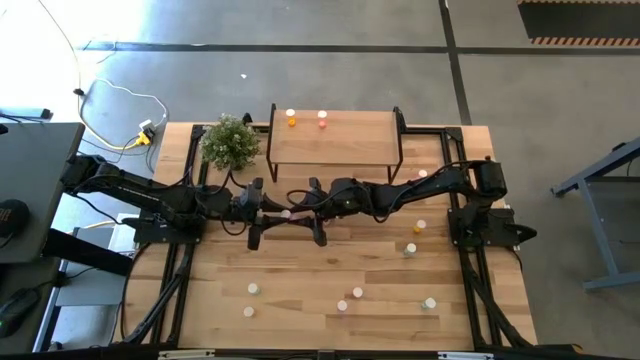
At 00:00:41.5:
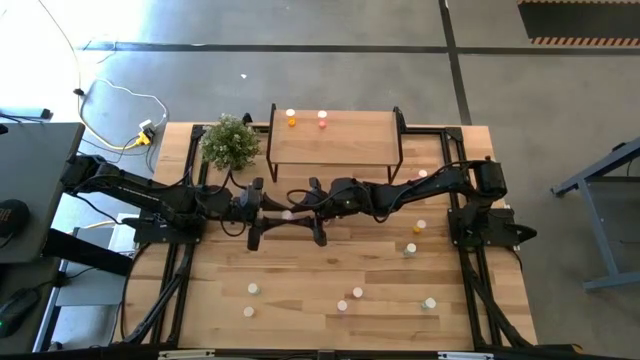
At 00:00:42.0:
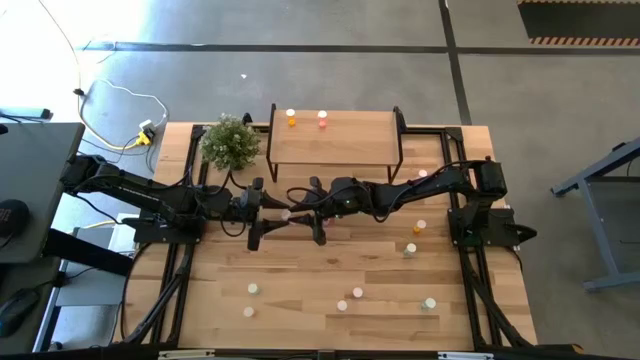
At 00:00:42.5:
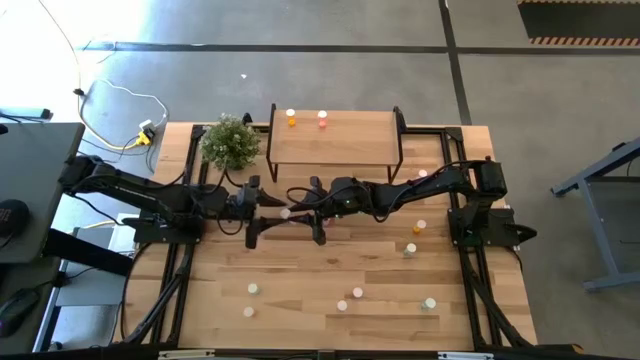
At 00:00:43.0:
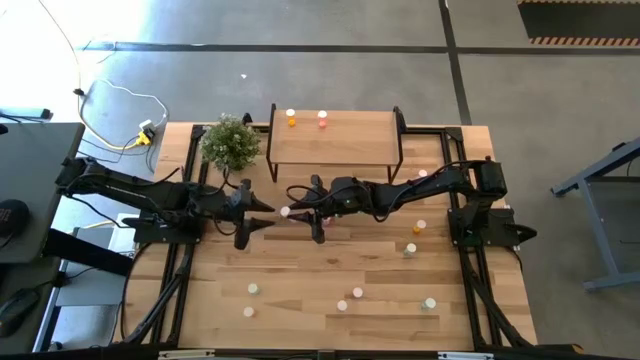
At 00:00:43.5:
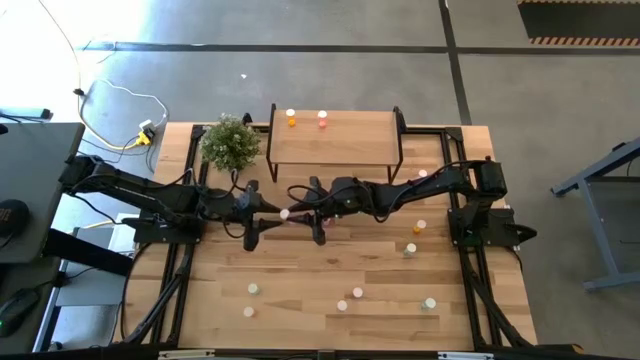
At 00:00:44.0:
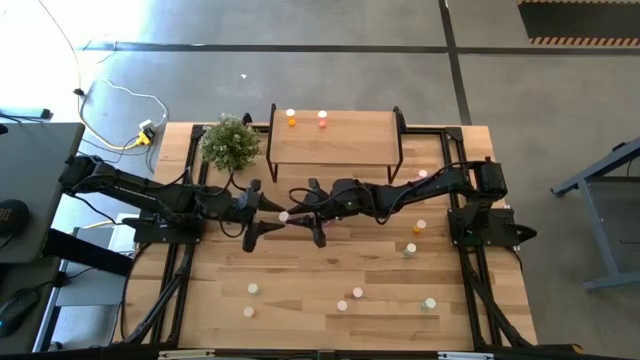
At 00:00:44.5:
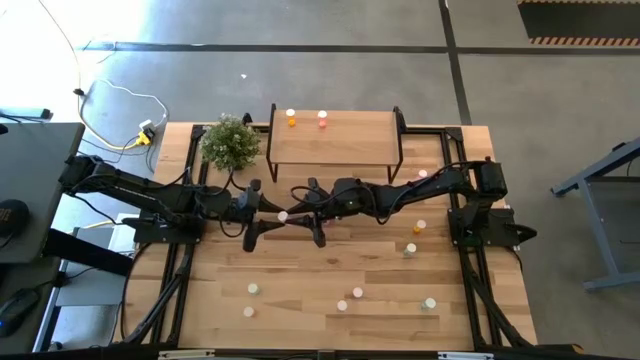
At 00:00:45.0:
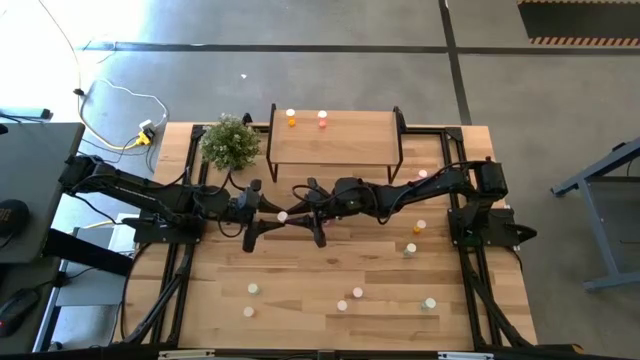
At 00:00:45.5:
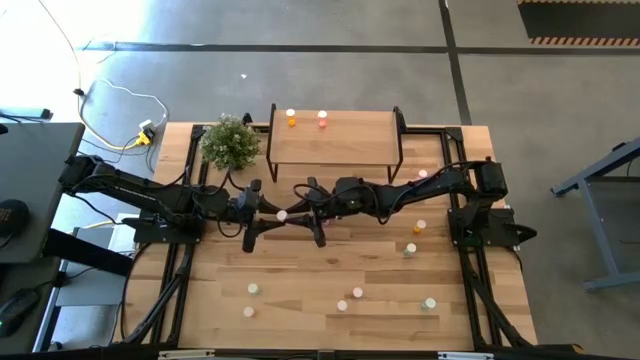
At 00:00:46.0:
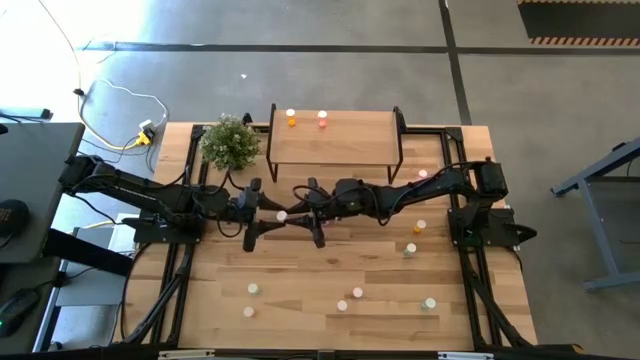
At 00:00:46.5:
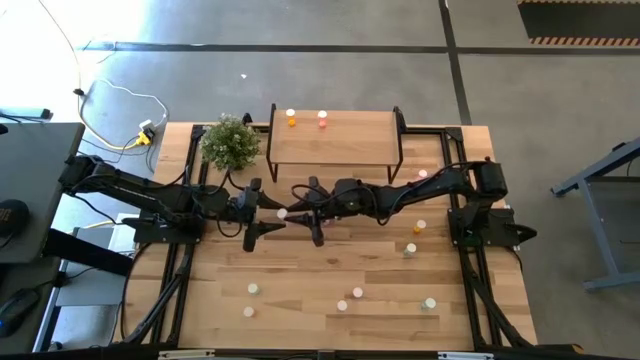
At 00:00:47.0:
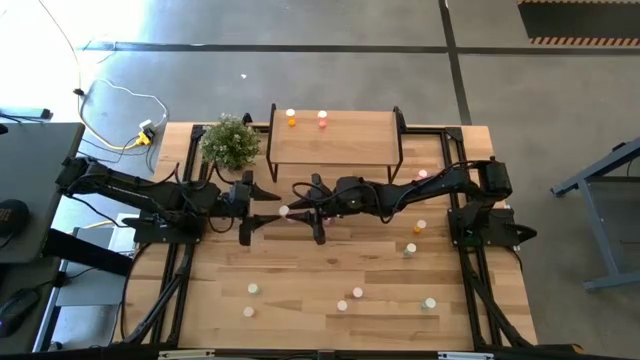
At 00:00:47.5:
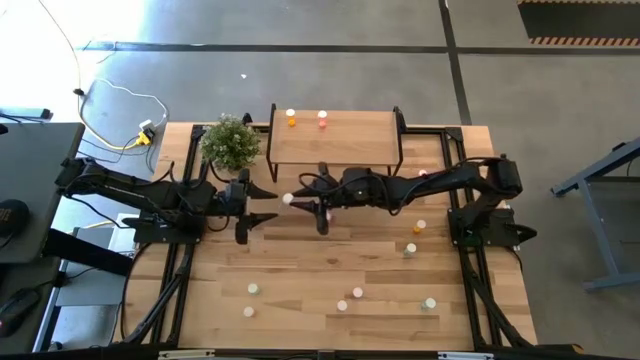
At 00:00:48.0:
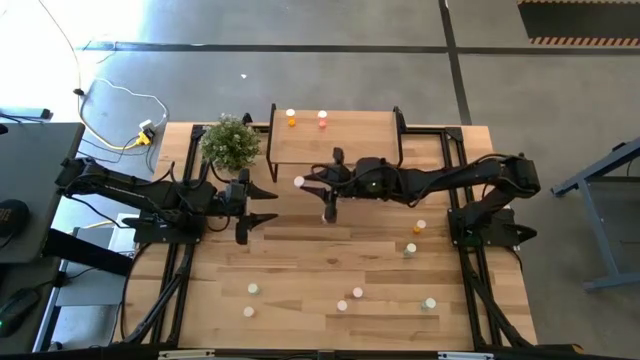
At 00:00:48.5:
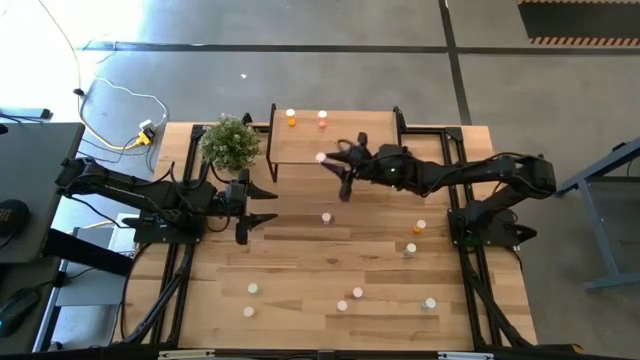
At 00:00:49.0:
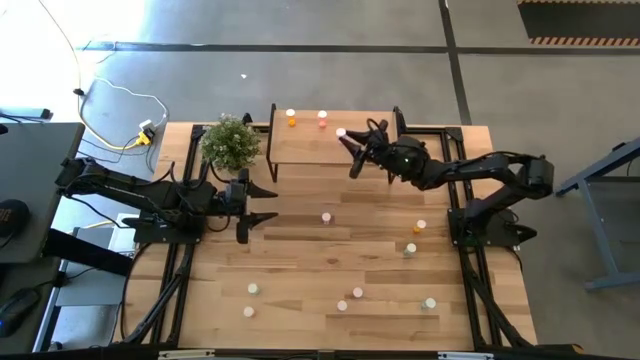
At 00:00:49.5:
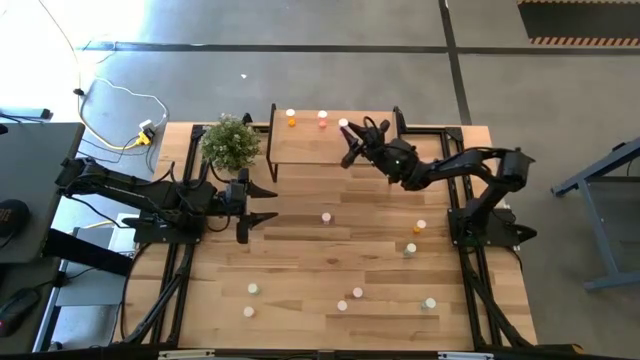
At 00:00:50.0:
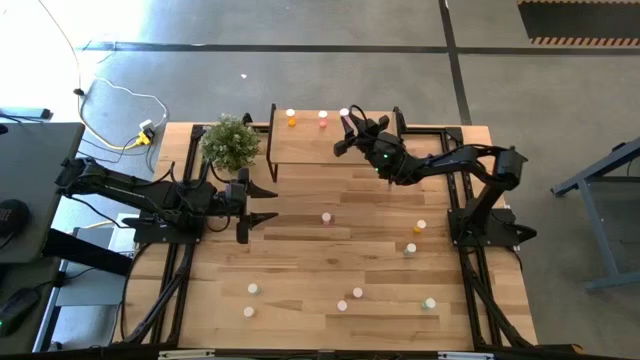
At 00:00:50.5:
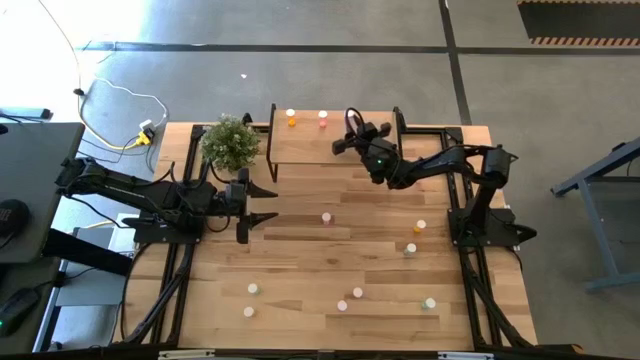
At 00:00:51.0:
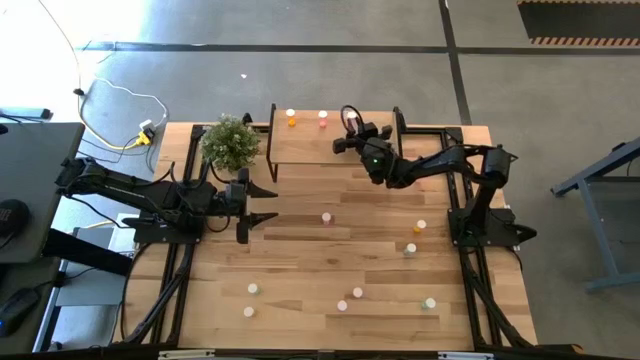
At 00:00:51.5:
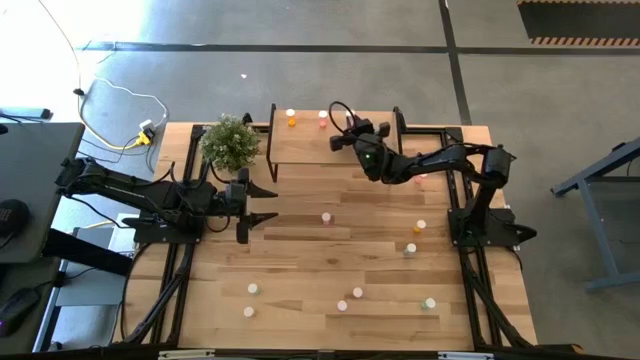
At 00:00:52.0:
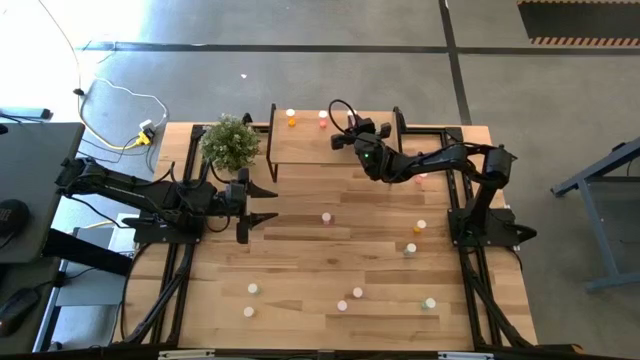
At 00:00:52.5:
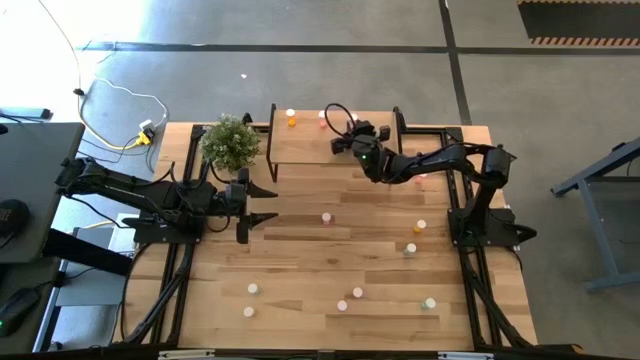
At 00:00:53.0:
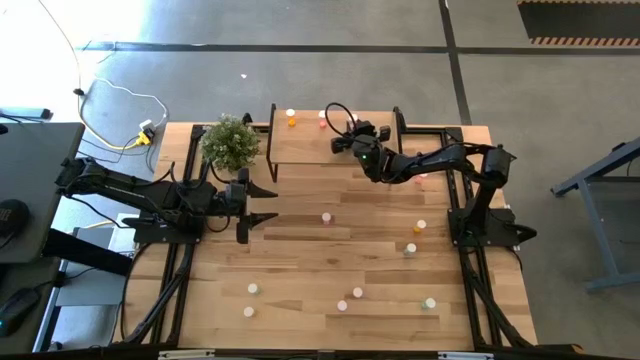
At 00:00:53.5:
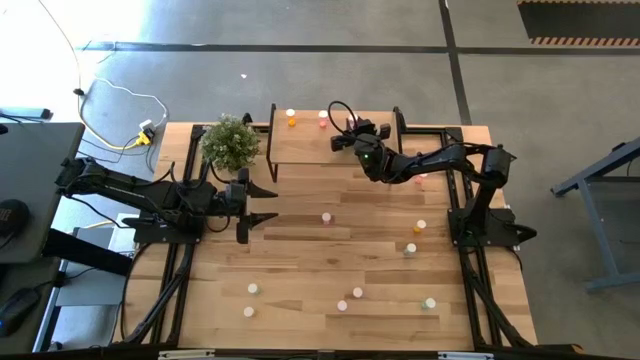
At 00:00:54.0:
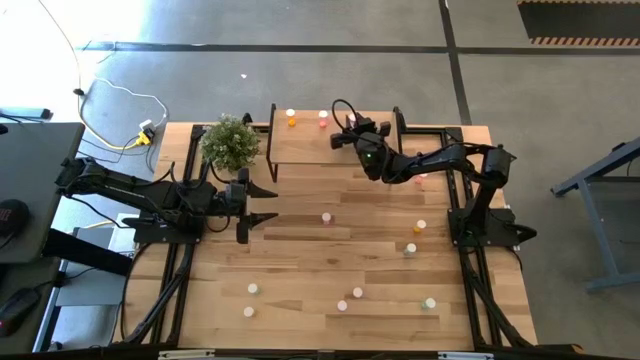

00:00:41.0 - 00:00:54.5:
Task: Pick and place medicine bottles onto shelf by color
Put the bottom left purple pill bottle on the shelf

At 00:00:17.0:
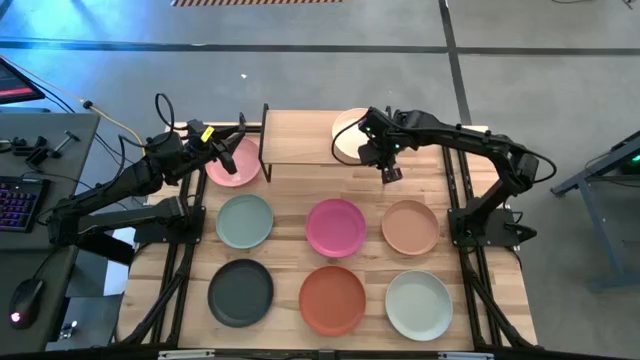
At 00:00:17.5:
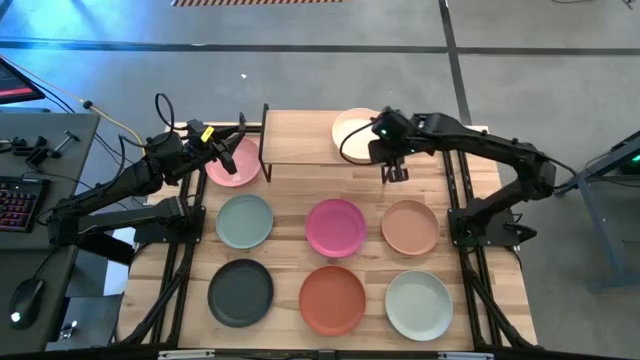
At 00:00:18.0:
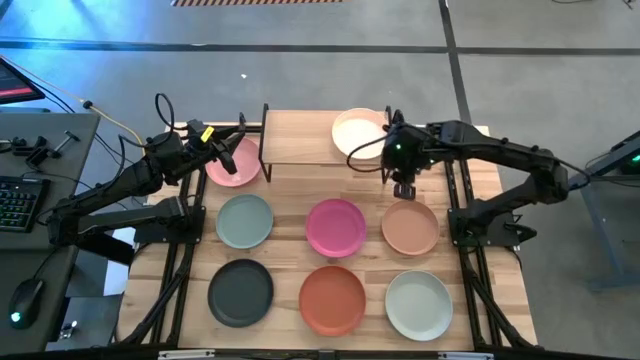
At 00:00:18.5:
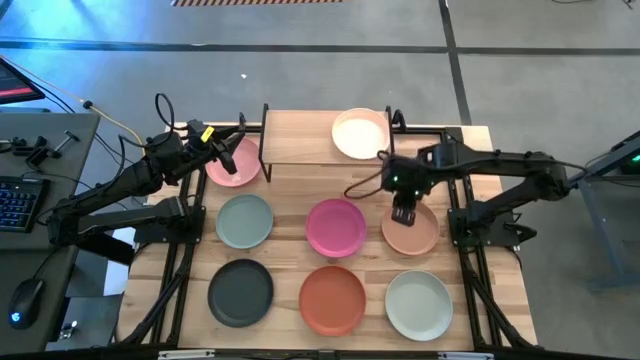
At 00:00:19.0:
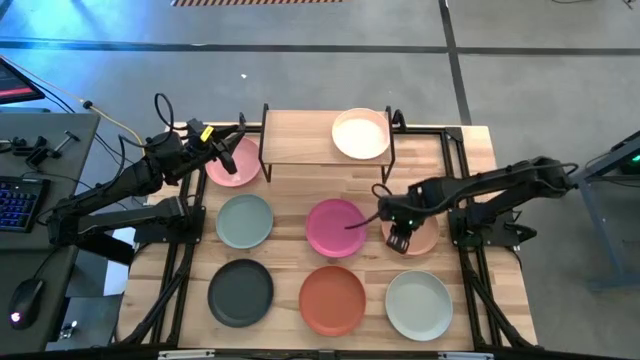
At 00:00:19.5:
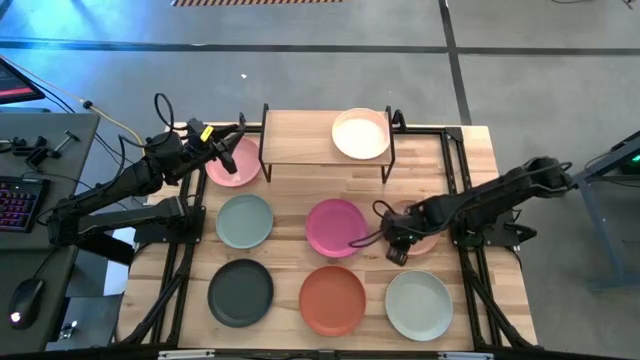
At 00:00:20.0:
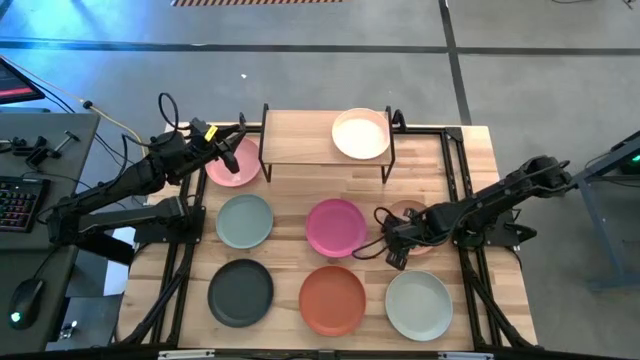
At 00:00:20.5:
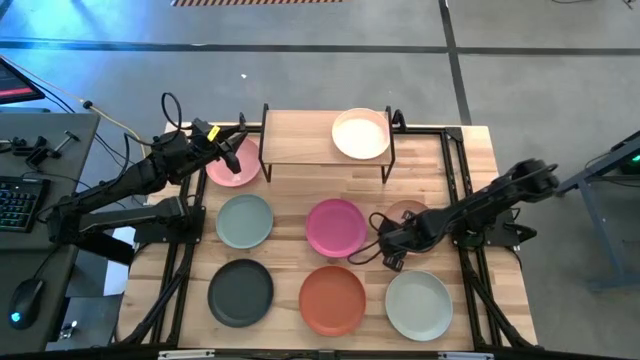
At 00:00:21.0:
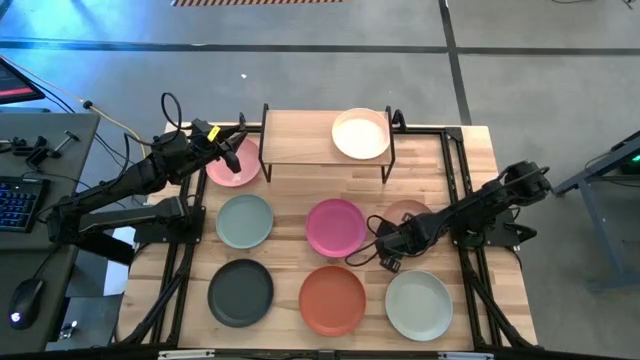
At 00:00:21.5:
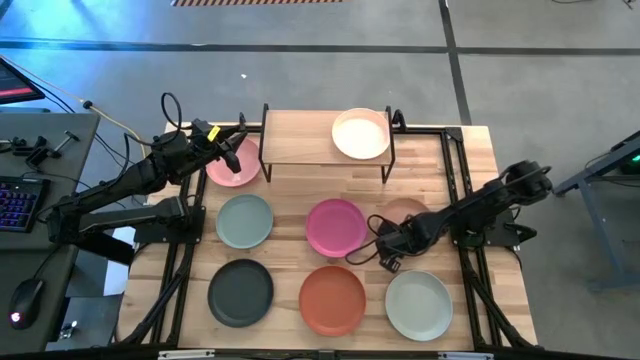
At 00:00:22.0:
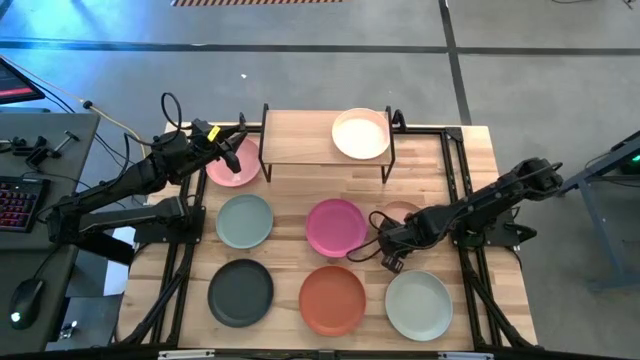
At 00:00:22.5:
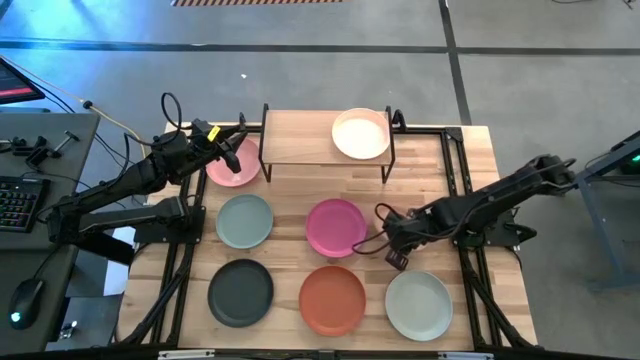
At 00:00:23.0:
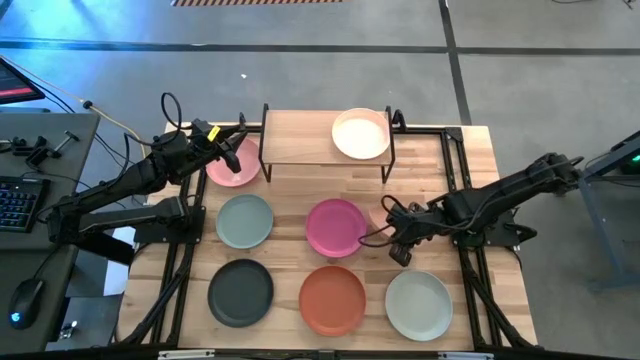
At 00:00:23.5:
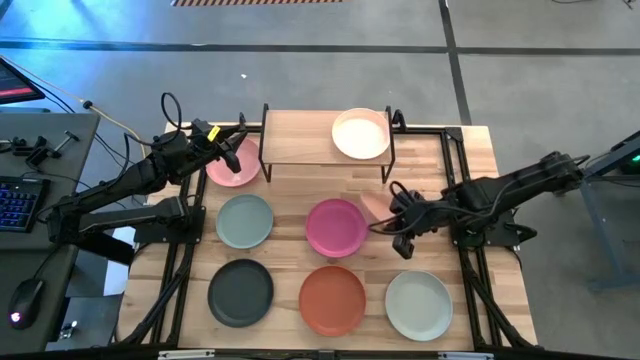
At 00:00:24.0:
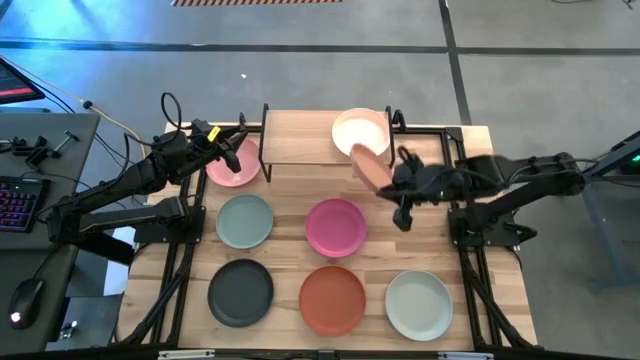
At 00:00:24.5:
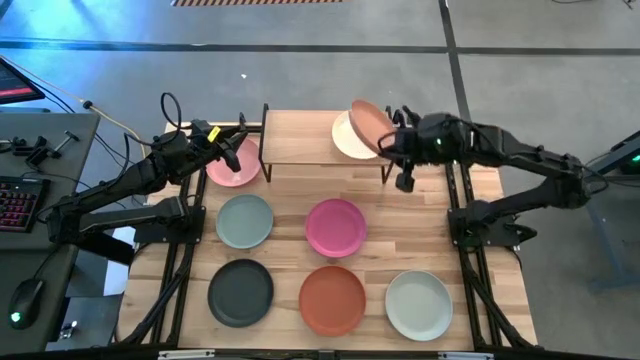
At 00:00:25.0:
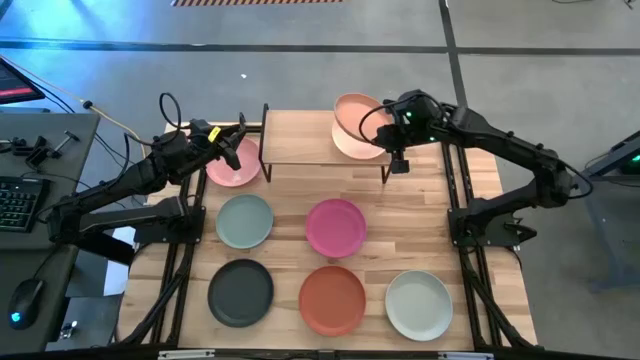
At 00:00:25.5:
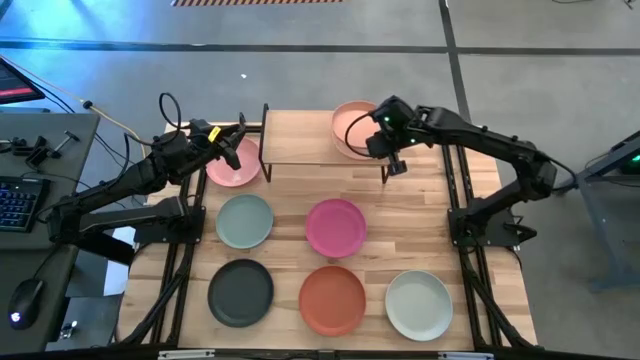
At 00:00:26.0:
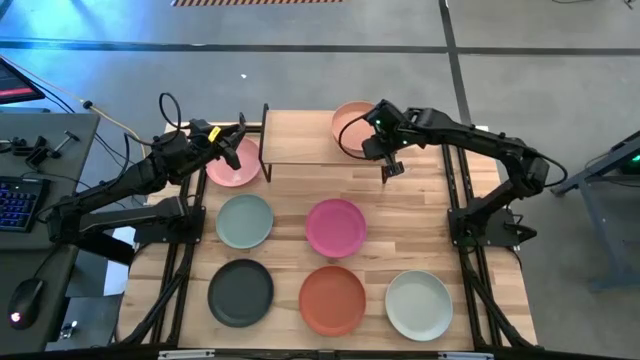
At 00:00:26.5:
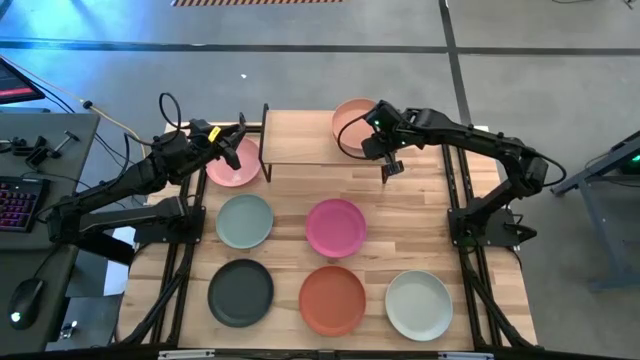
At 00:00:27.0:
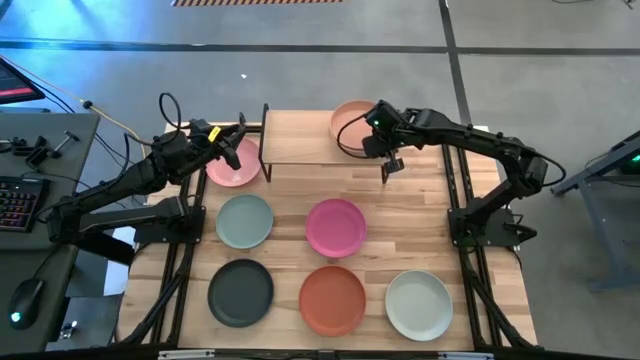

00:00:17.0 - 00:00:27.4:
Task: Place and stack plates onto a shelf
Stack the brown plate on top of the light orange plate on the shelf
